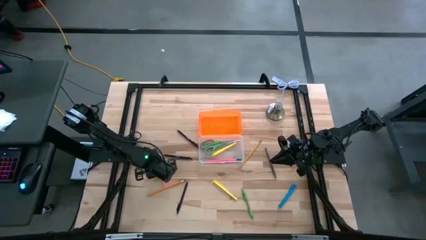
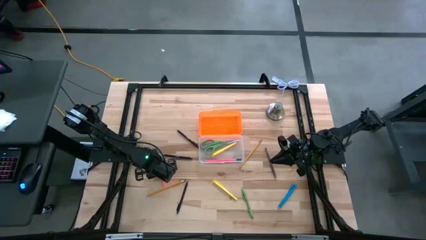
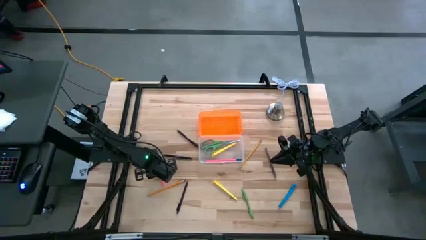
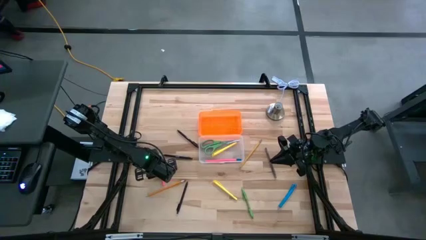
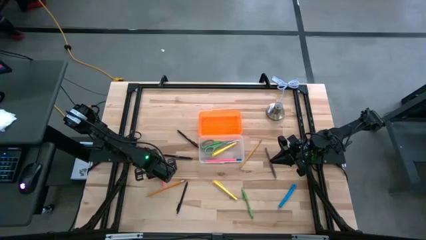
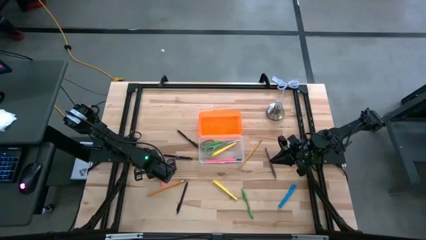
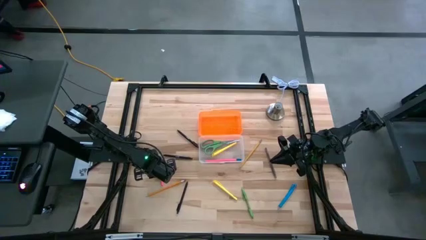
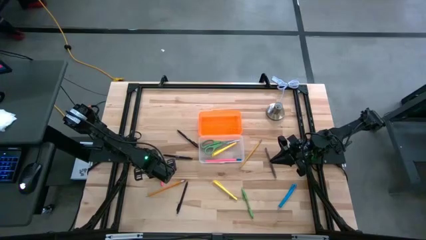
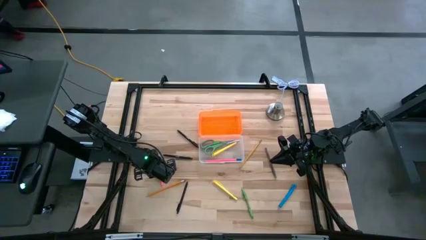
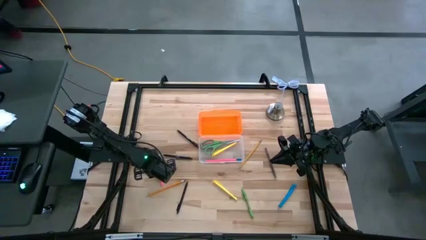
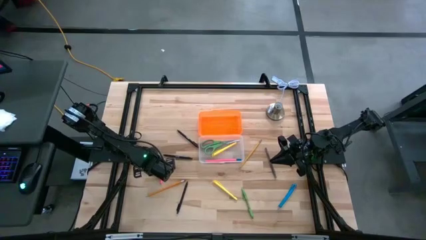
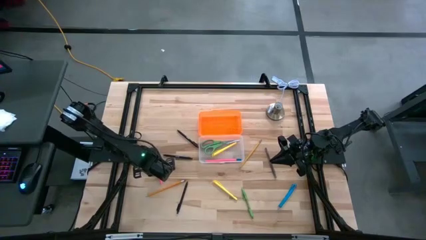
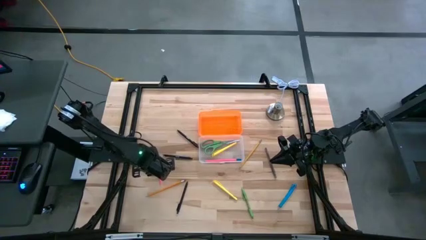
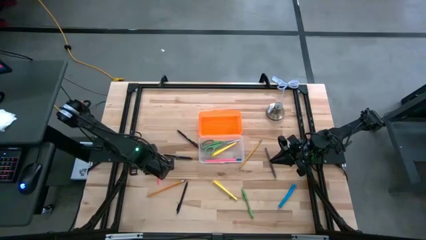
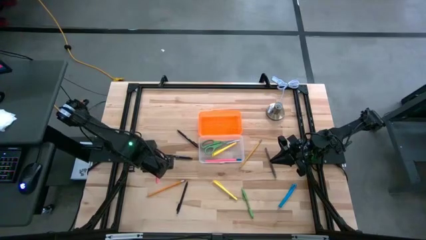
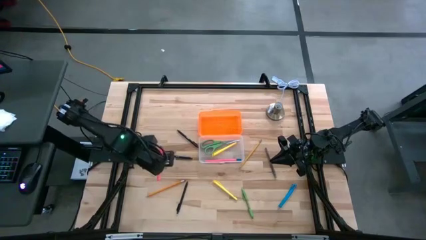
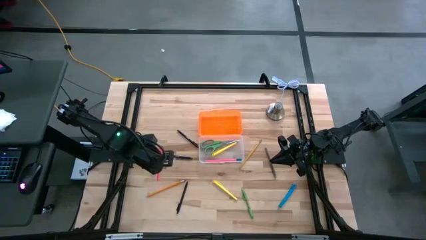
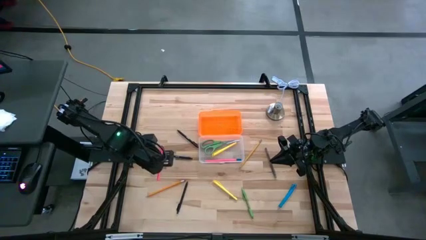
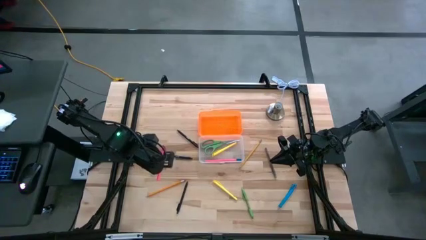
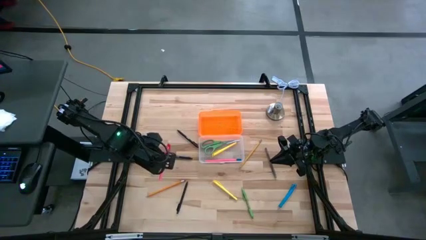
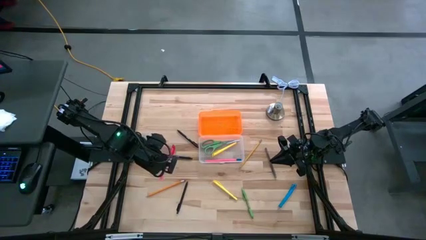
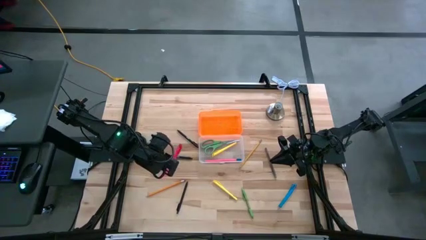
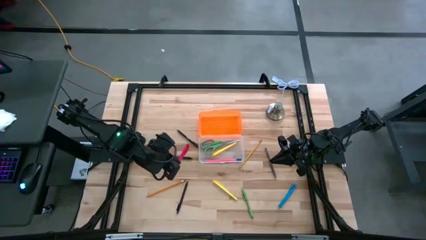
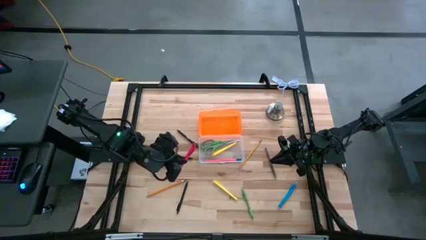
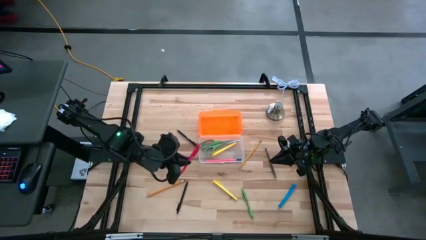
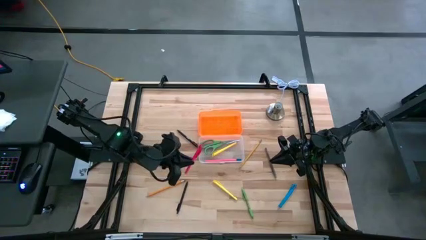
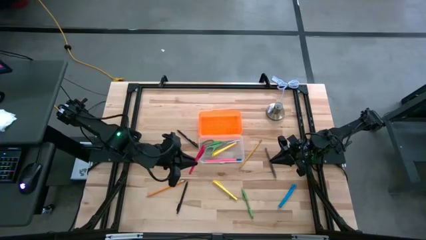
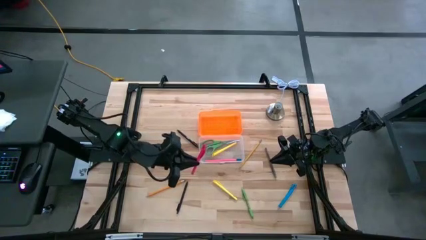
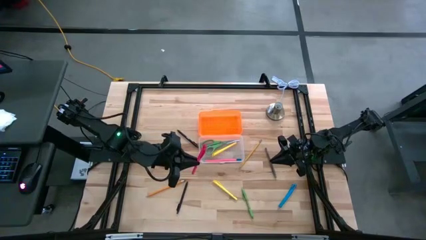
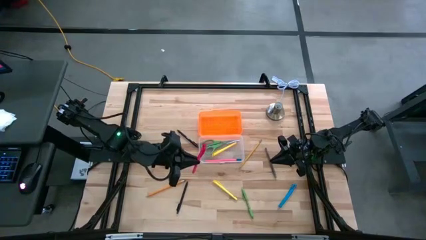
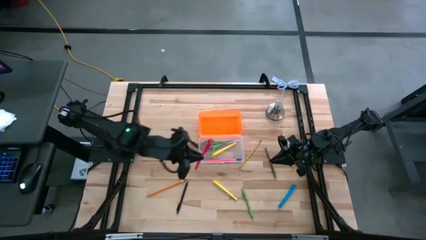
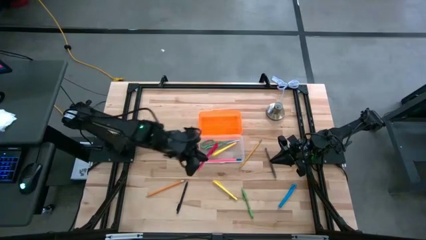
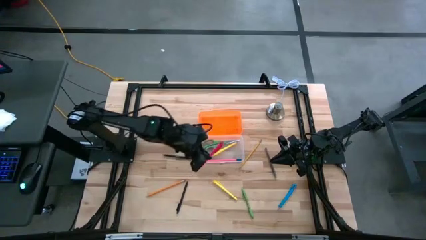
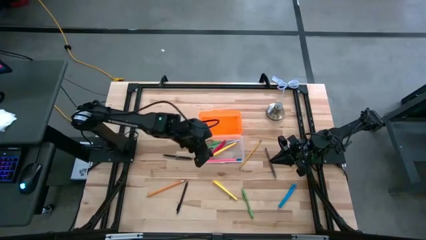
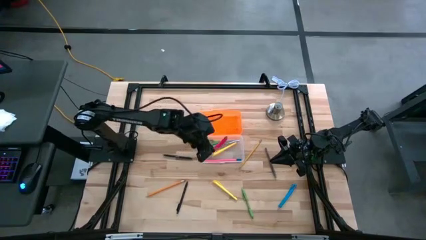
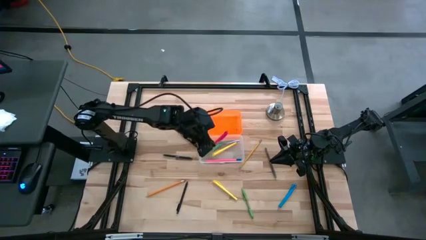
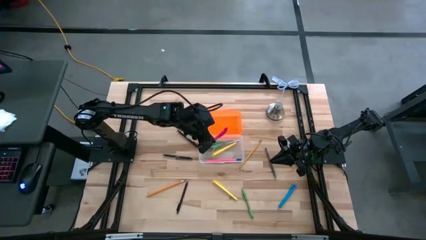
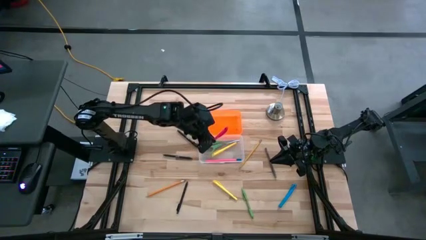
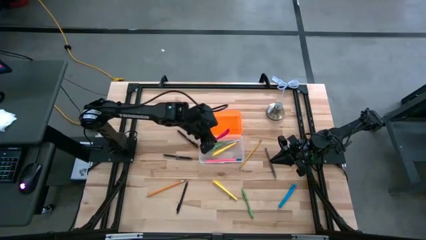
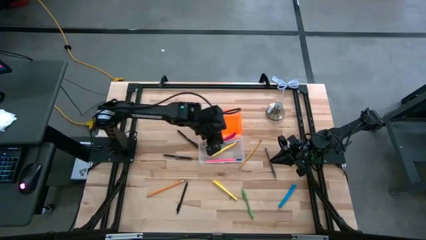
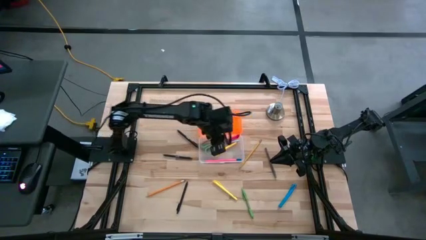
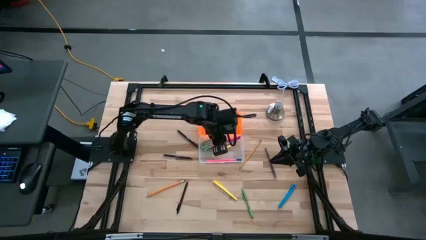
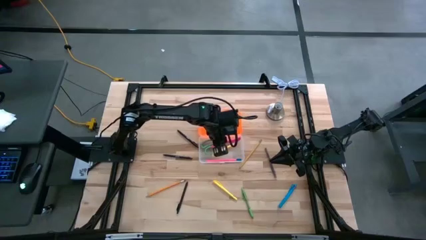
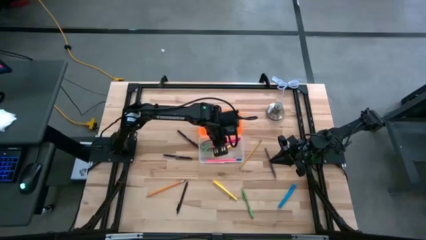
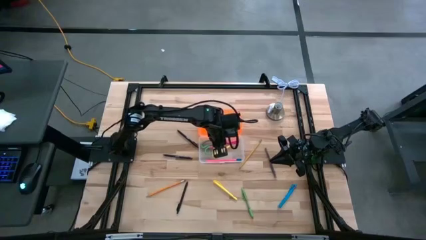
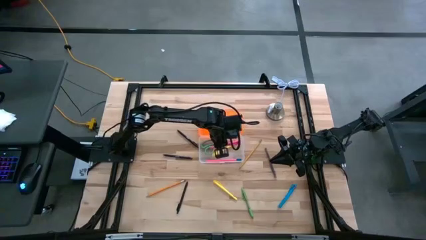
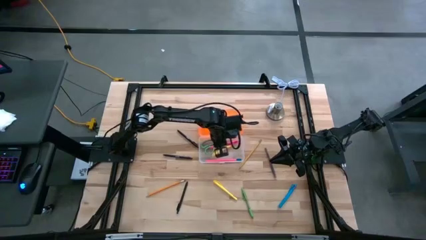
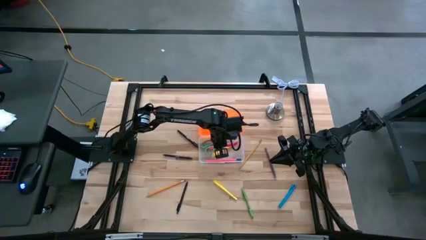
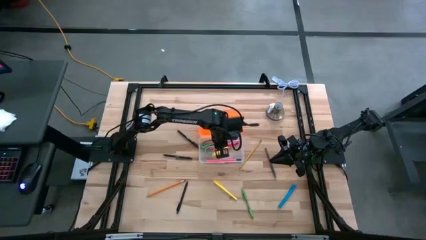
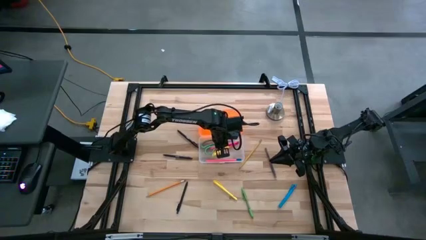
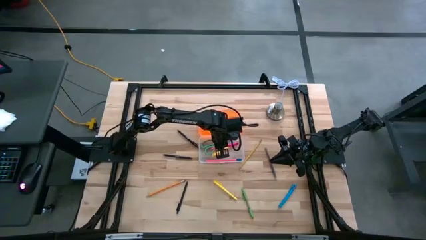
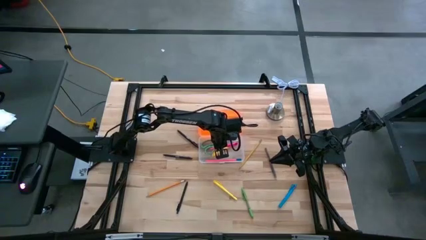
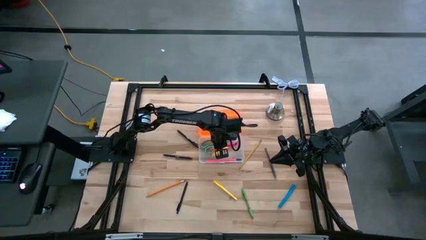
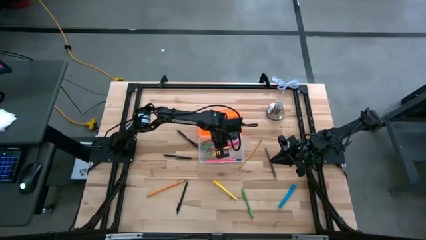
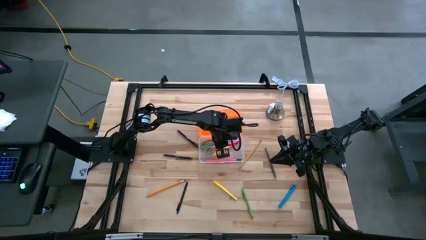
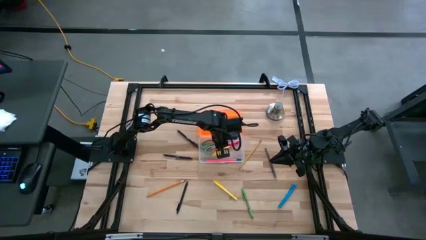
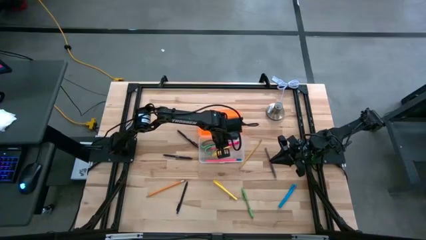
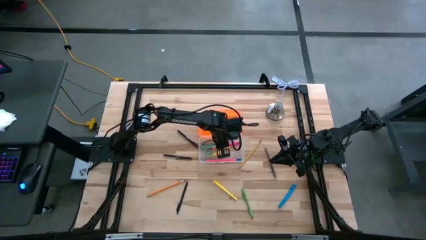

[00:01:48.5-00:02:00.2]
Task: Pick & place school supplies into a supply box
Put the pink pen into the container

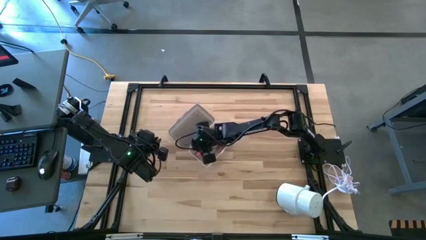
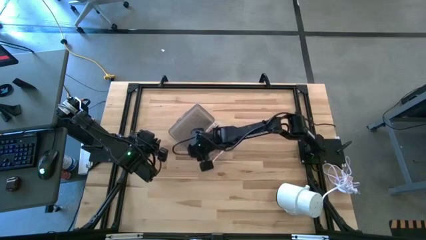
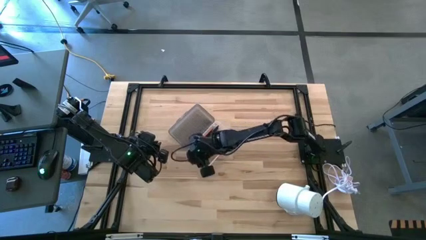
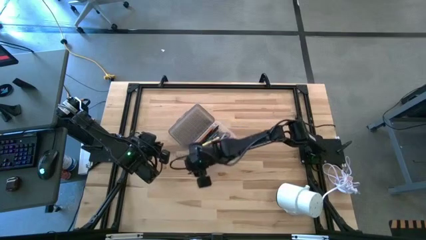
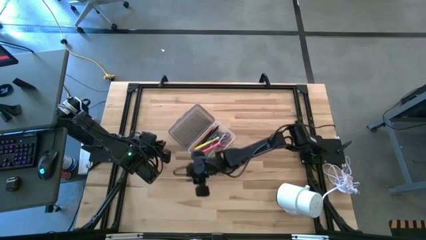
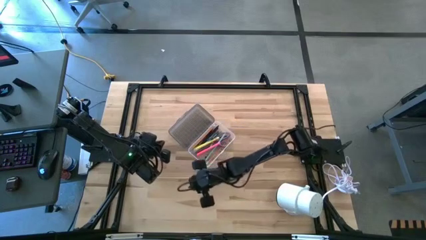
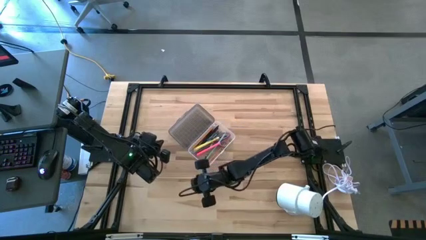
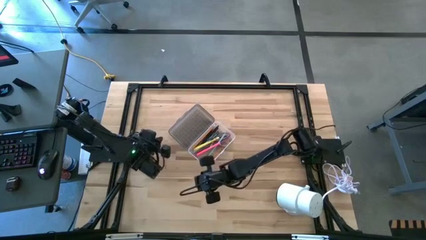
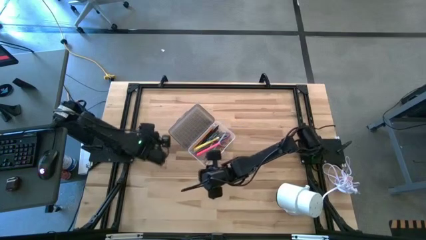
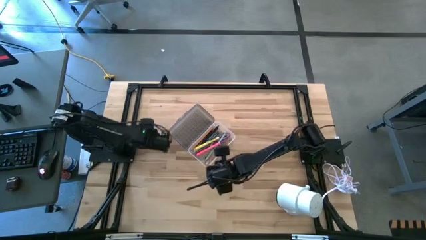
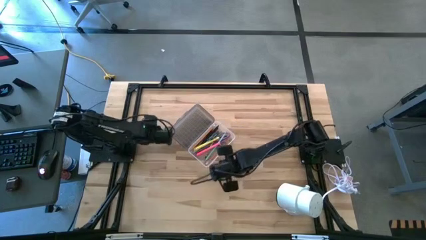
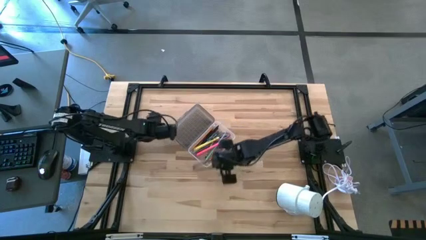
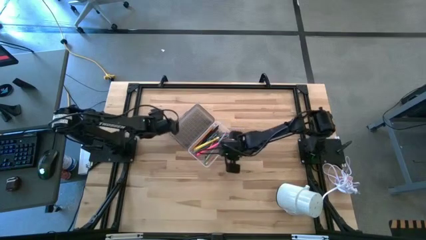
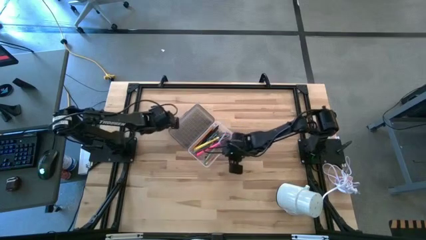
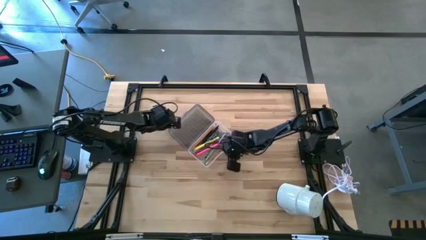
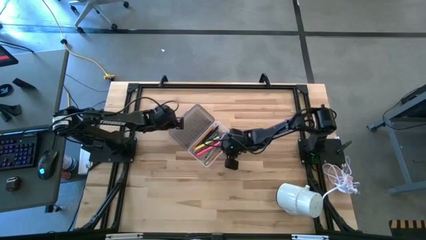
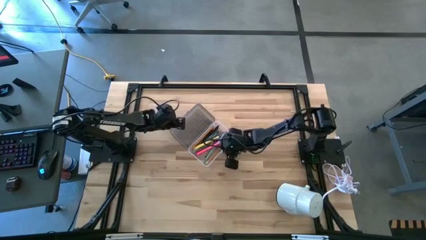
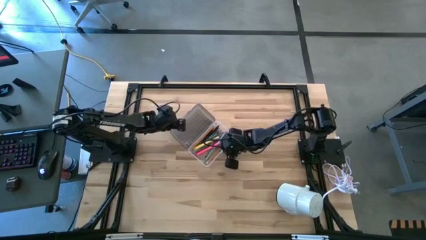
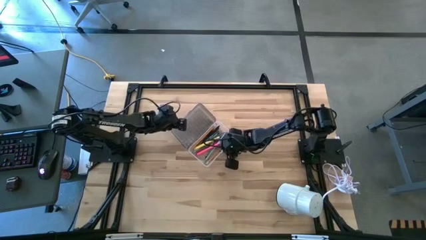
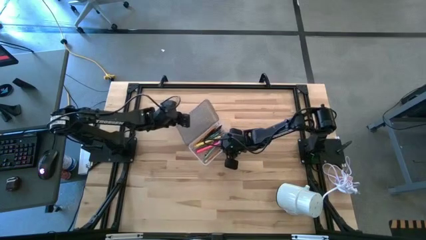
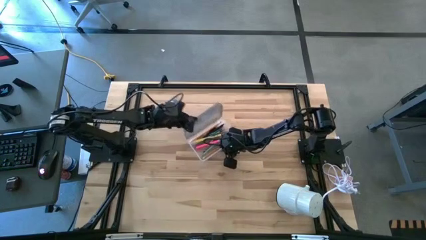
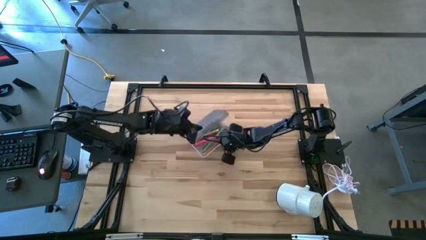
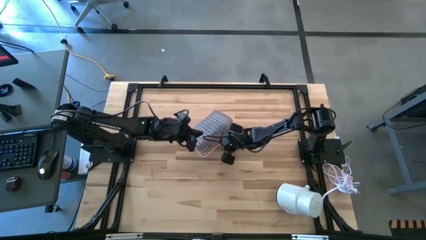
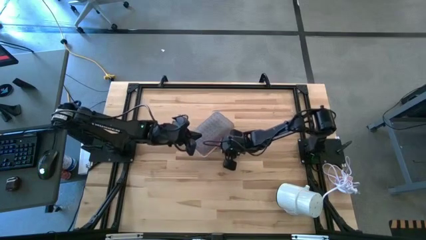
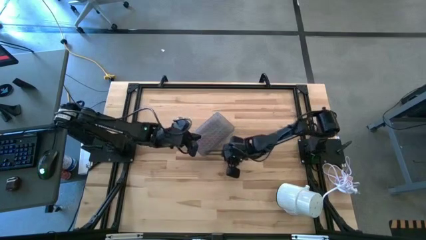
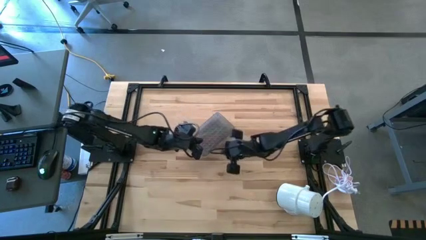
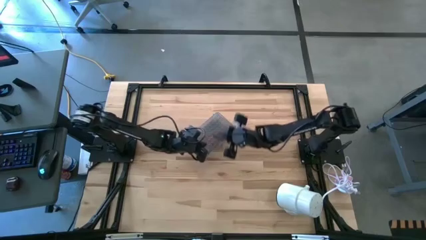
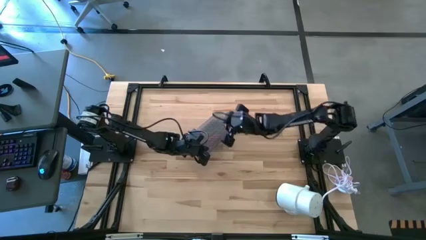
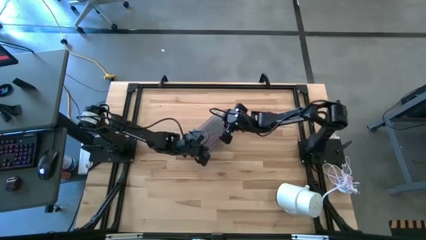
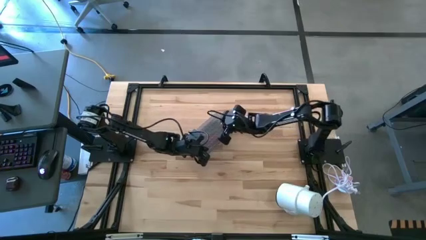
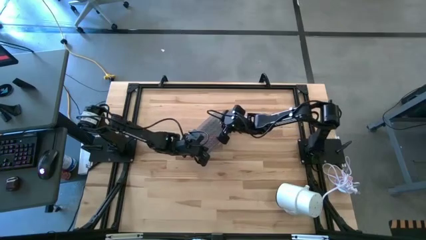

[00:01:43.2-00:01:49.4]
Task: Pick & place school supplies into a supply box
Close the gray supply box
